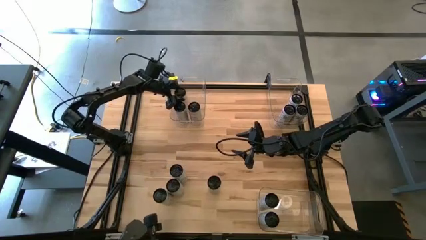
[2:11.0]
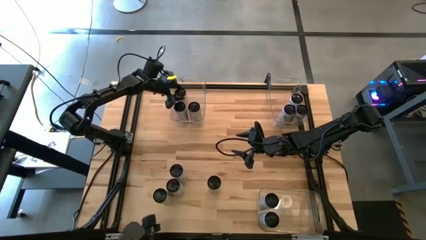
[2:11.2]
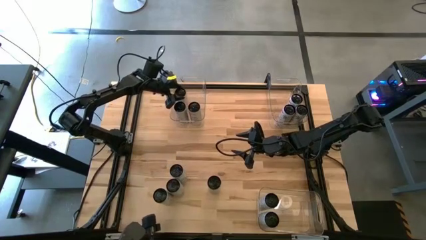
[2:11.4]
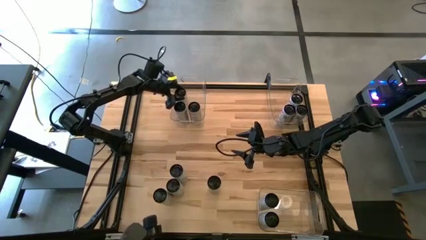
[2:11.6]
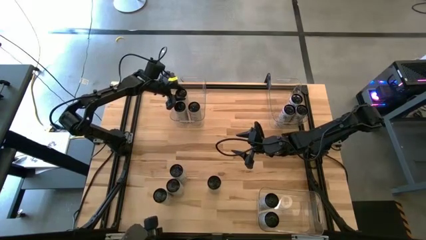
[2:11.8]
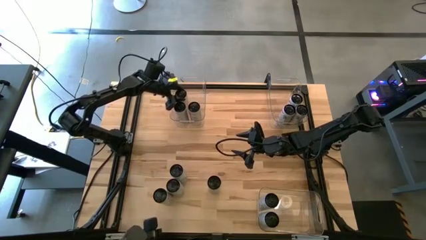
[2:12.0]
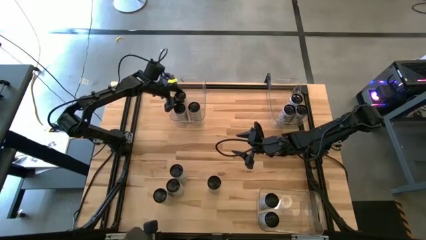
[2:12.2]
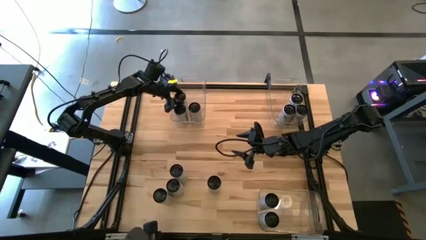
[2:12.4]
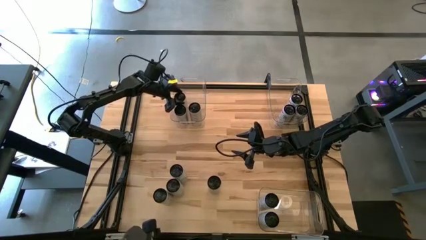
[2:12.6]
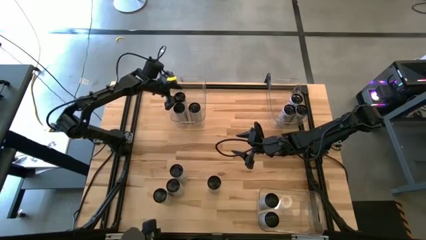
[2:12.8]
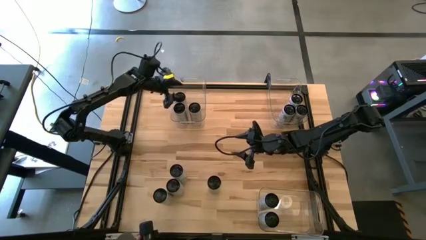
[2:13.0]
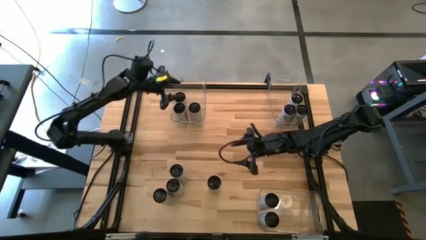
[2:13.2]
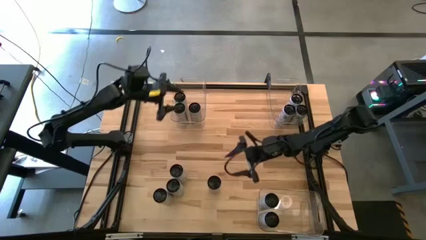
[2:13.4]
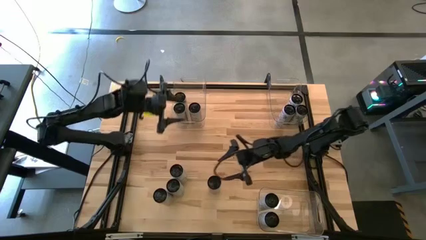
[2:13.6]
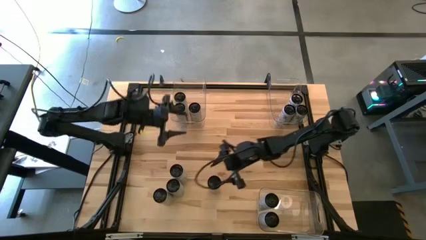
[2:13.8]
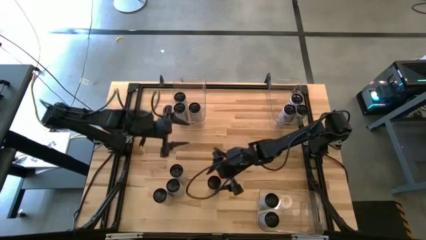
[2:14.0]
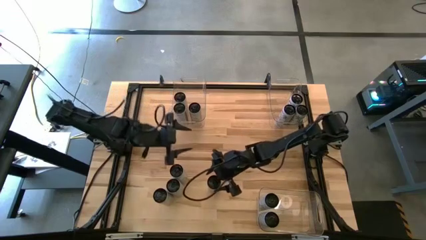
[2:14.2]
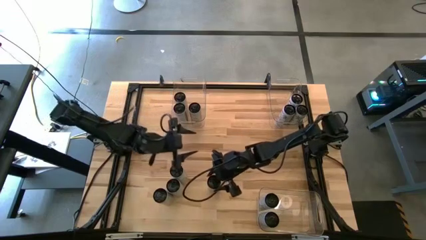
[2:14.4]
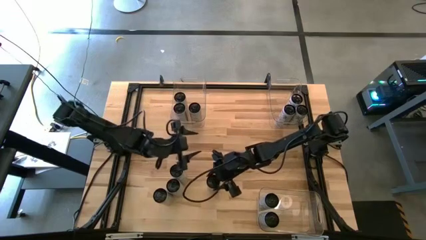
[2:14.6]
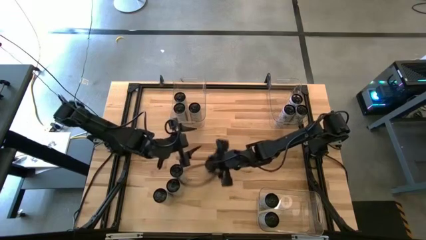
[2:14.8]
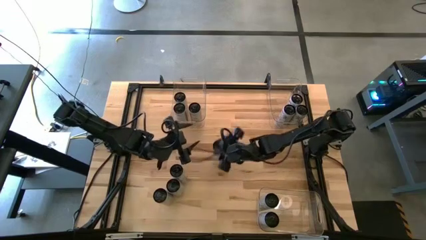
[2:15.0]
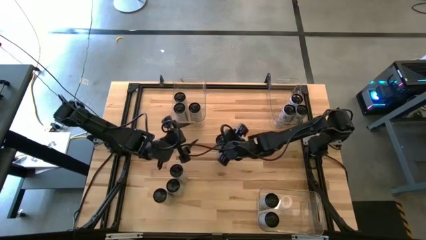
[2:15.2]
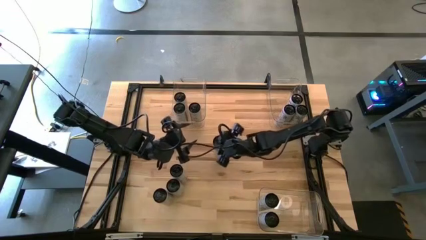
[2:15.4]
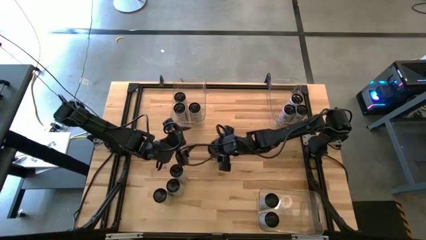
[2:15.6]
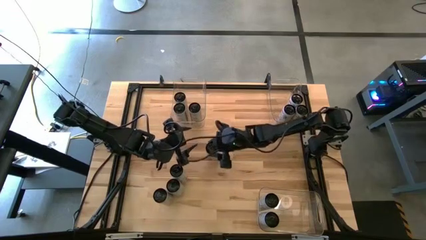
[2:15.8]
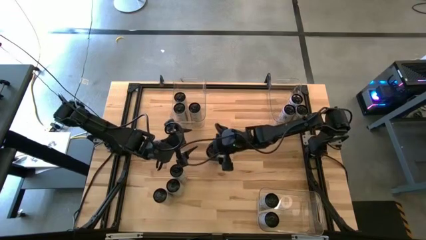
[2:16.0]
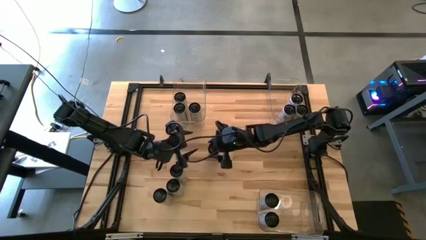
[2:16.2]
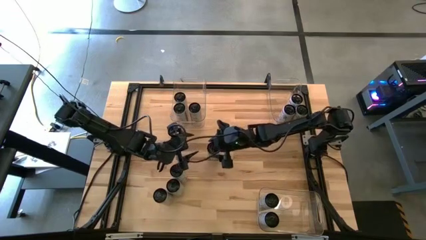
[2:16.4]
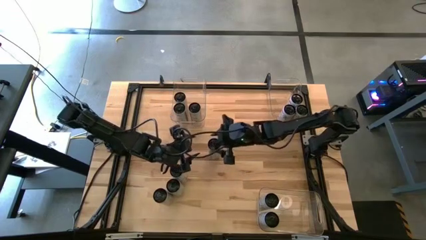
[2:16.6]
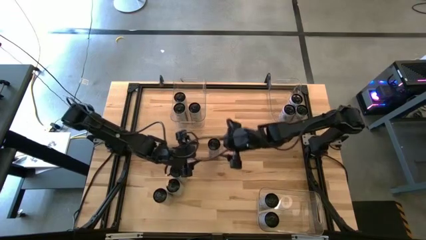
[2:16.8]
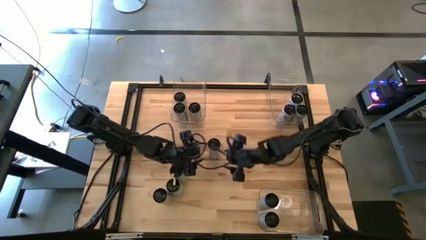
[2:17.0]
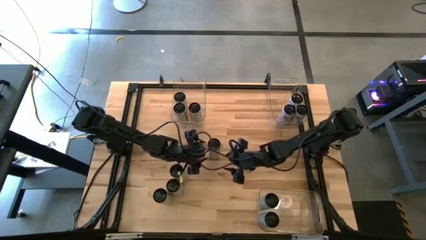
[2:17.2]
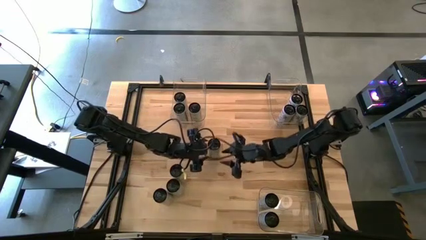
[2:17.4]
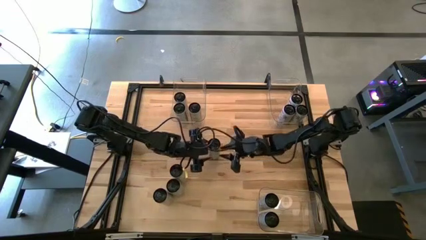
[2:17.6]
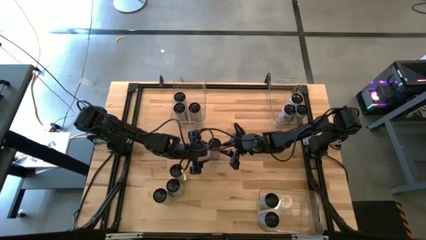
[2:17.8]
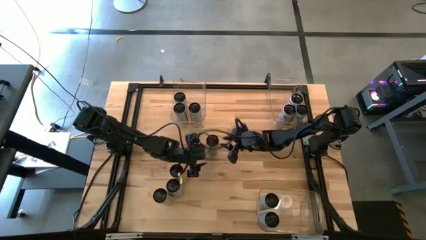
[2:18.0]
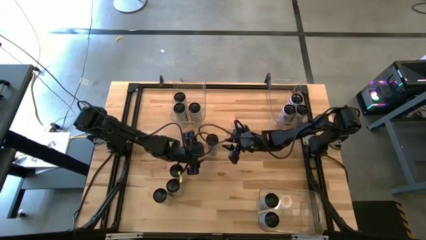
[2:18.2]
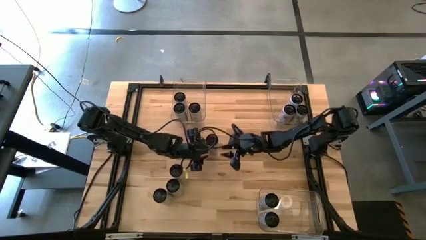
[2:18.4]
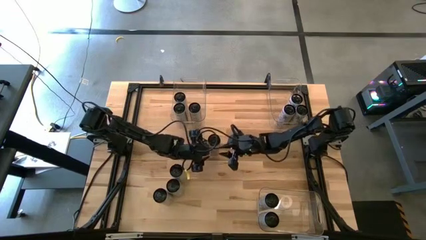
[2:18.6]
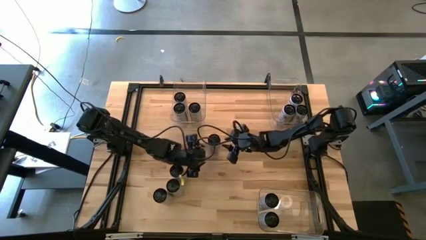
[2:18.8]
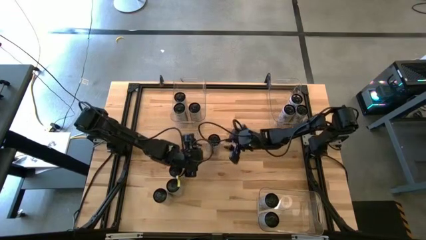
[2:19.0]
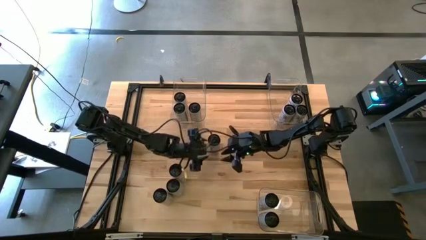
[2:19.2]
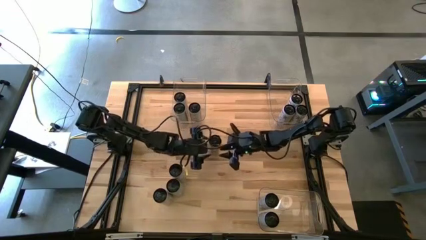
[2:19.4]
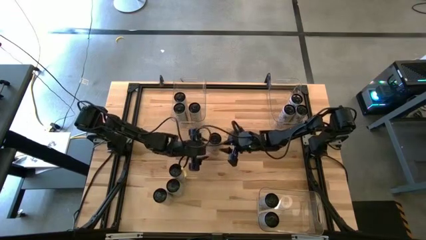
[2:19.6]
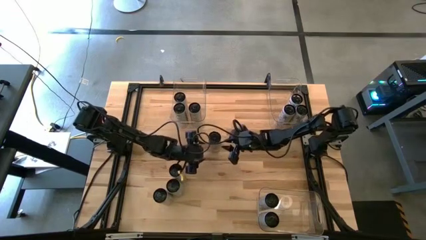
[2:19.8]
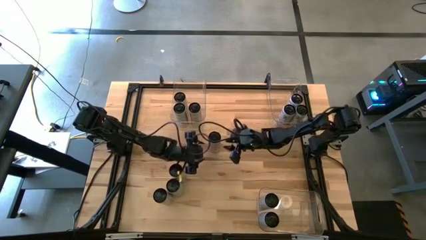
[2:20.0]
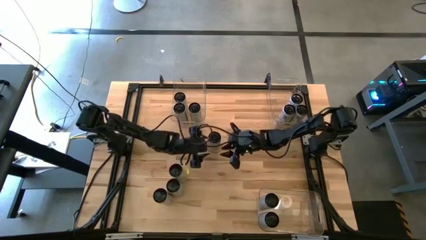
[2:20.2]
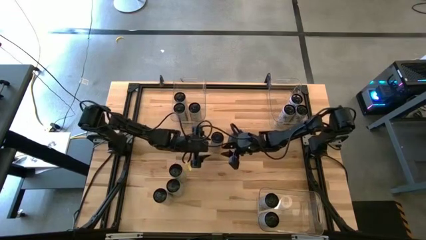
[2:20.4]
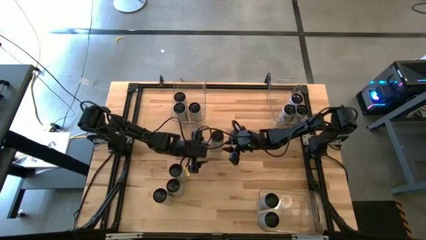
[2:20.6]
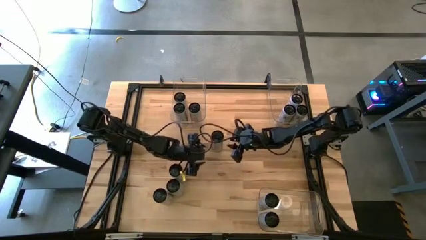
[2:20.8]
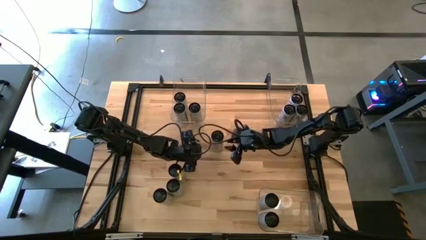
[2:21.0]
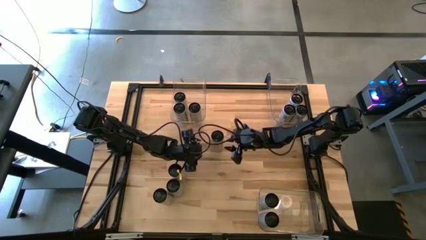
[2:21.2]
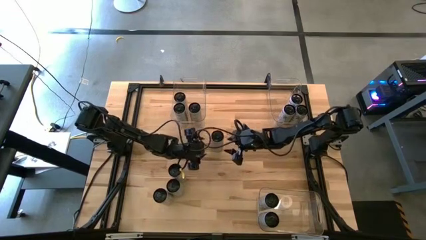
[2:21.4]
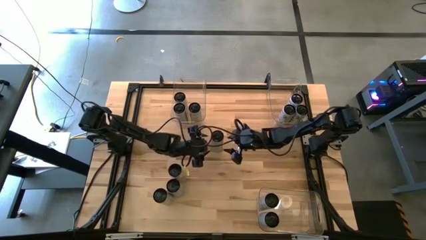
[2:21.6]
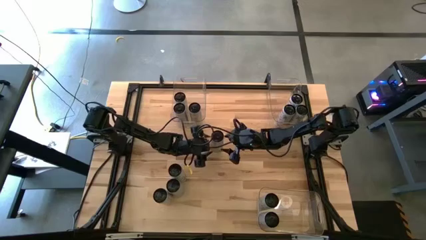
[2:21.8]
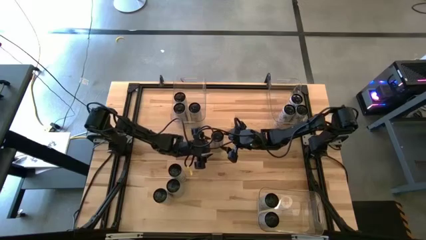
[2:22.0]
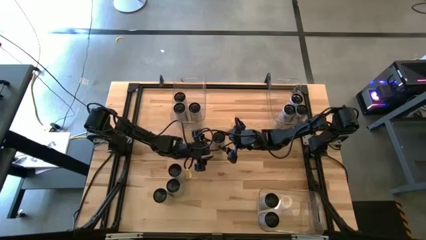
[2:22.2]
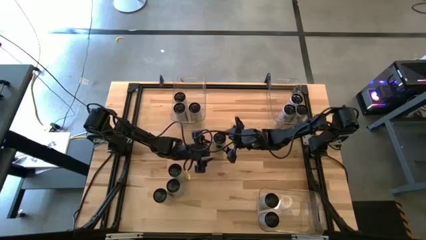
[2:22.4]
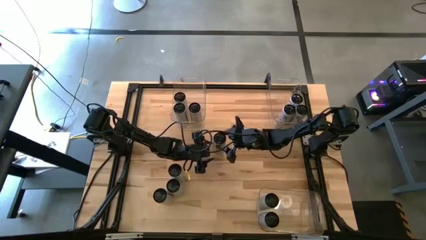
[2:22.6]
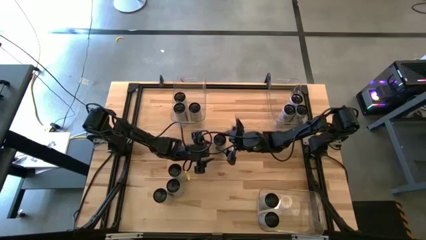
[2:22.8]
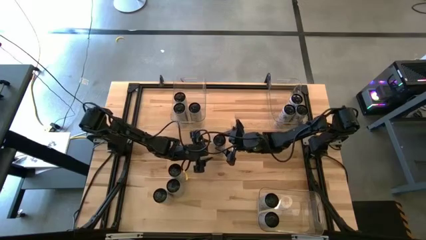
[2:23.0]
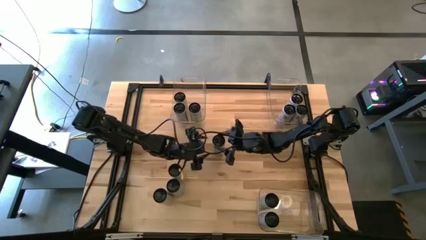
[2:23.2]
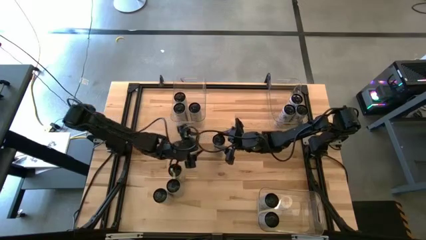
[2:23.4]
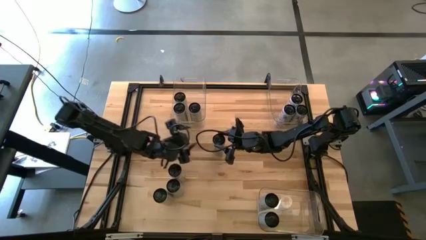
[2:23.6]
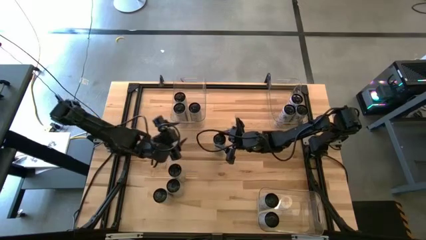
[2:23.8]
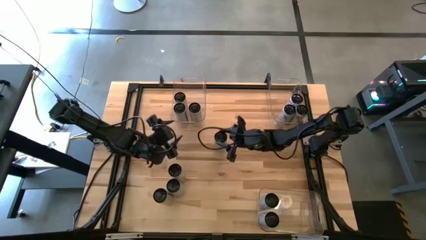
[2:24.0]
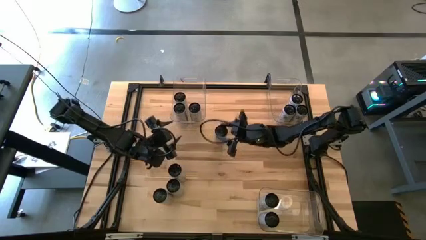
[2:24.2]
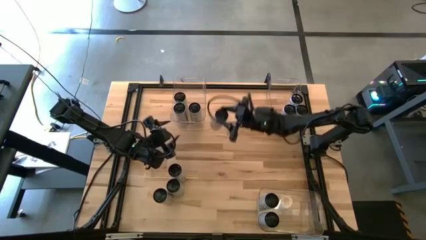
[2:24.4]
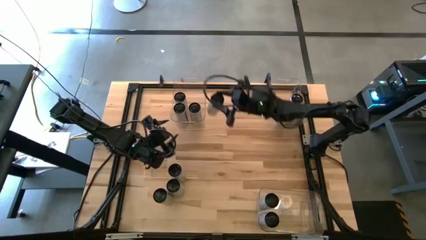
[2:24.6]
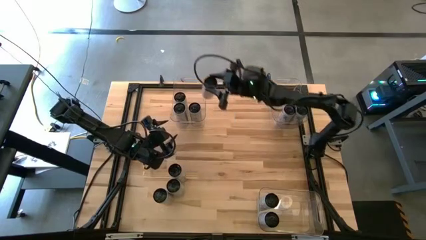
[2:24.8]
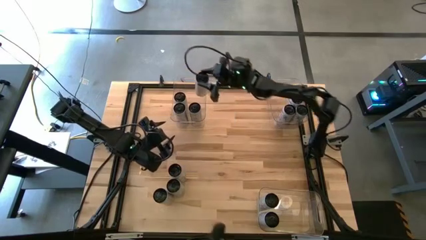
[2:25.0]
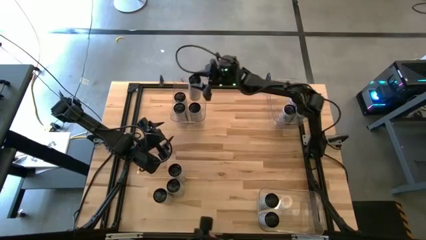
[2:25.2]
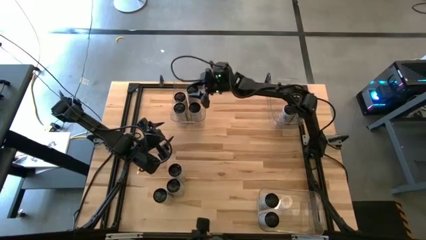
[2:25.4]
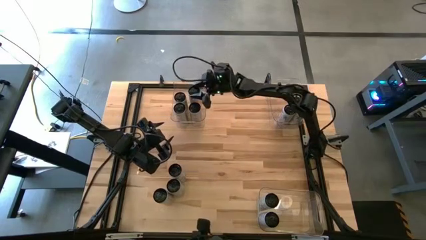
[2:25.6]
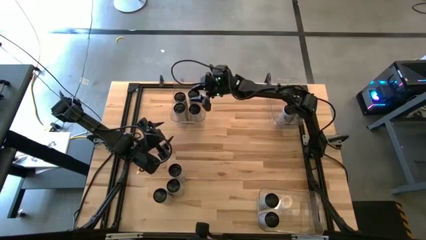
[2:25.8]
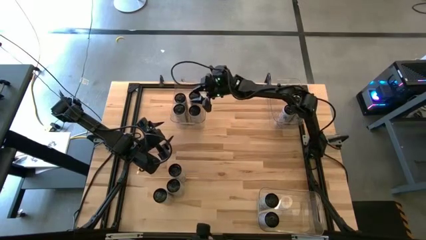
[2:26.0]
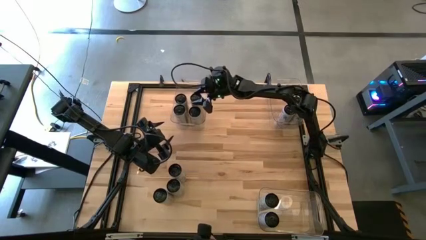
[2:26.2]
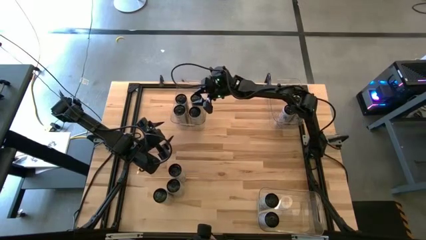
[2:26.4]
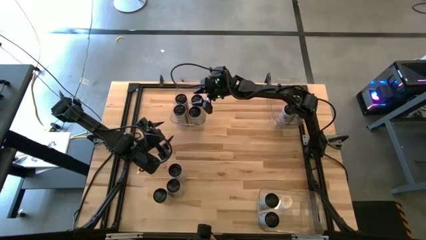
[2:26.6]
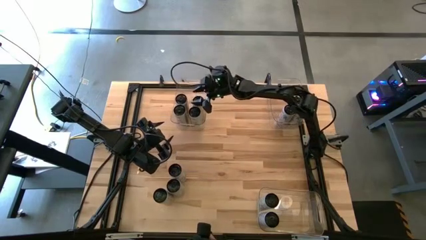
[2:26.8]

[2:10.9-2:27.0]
Task: Sort soda cans
Put the white/yellow soda can into the top left transparent bin
